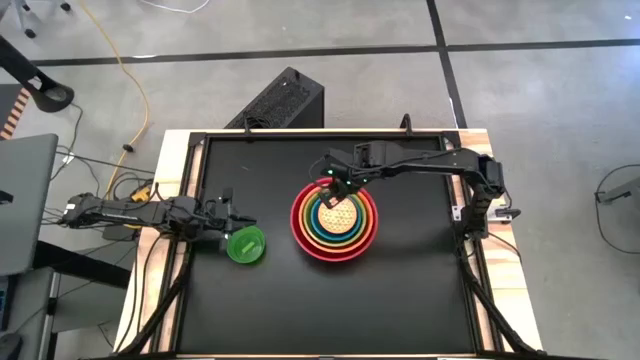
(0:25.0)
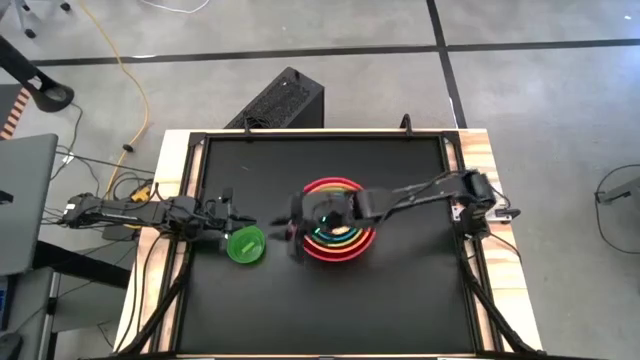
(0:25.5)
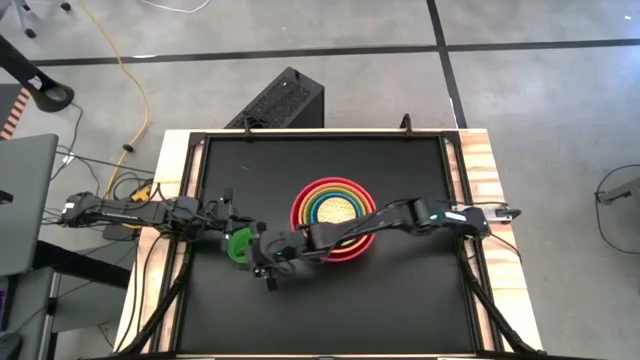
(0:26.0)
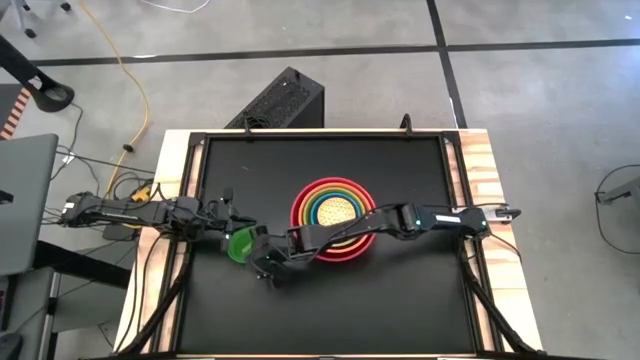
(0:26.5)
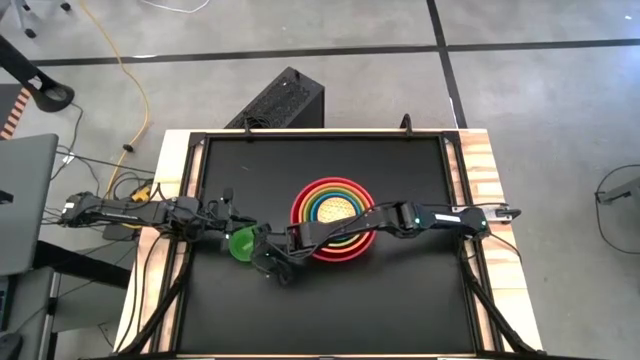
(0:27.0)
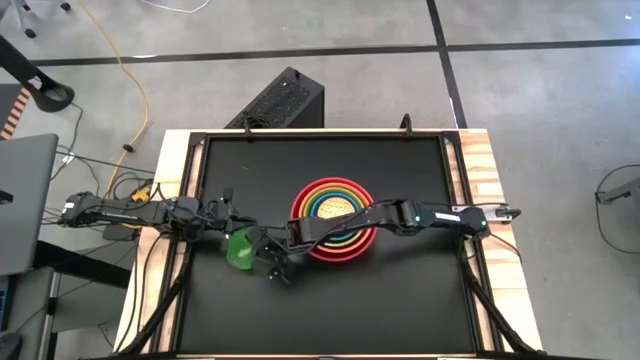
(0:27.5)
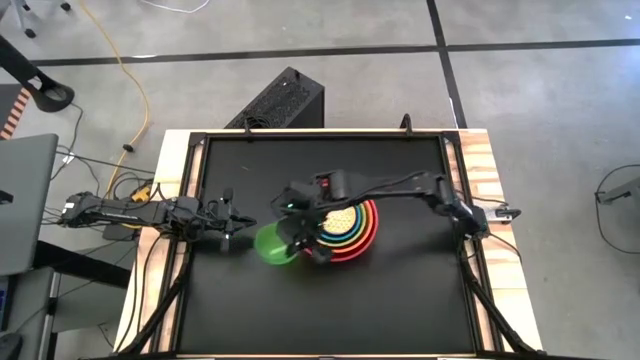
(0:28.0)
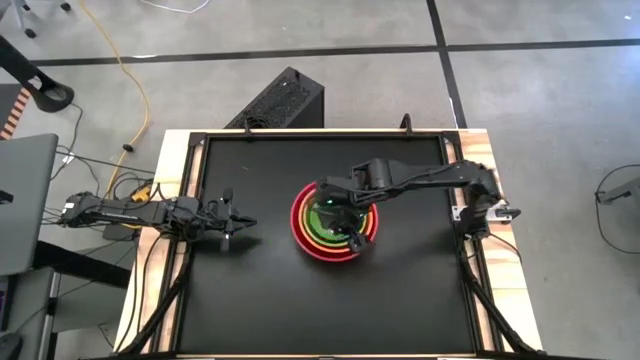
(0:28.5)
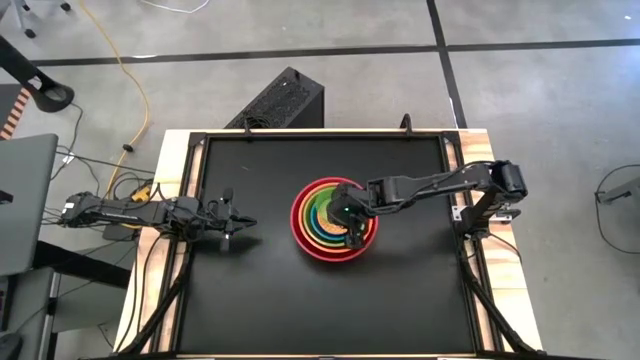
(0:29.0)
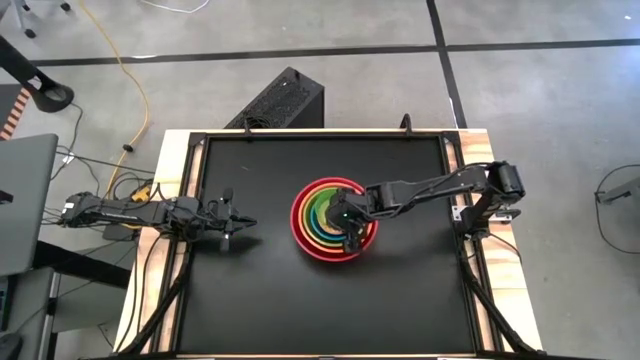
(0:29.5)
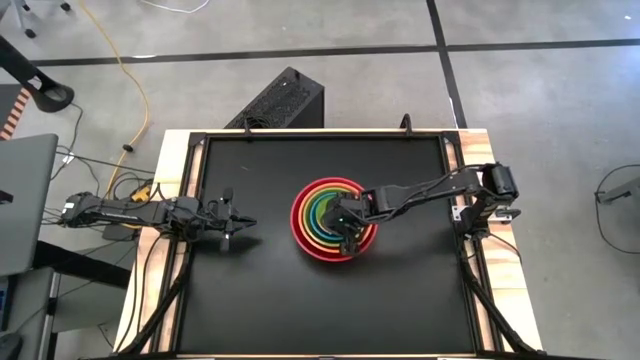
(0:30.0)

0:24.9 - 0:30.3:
Stack the light green bowl into the orange patterned bowl

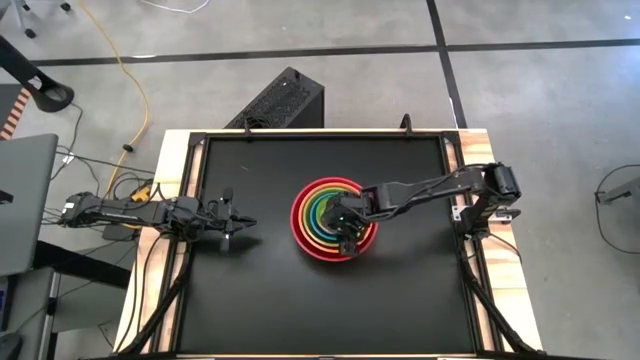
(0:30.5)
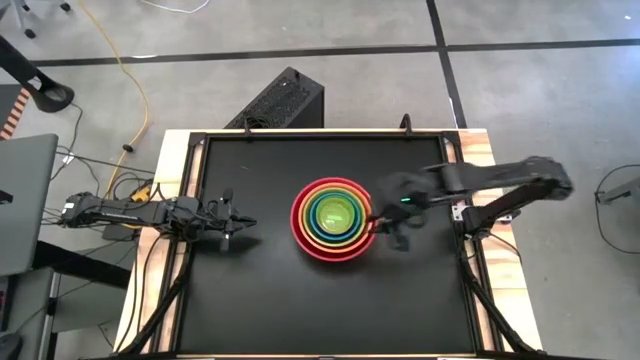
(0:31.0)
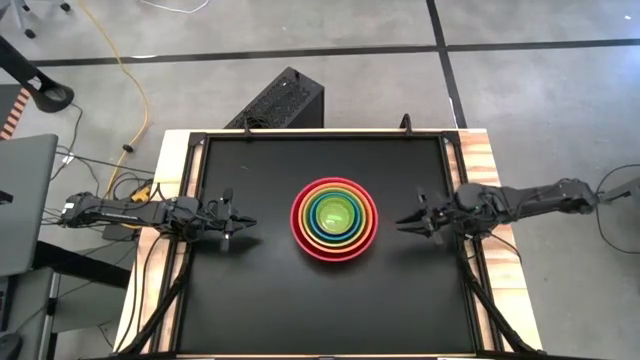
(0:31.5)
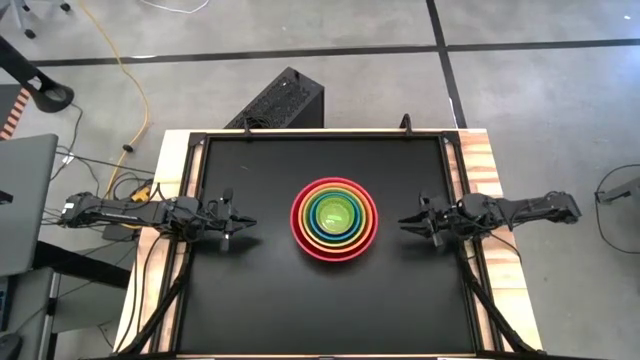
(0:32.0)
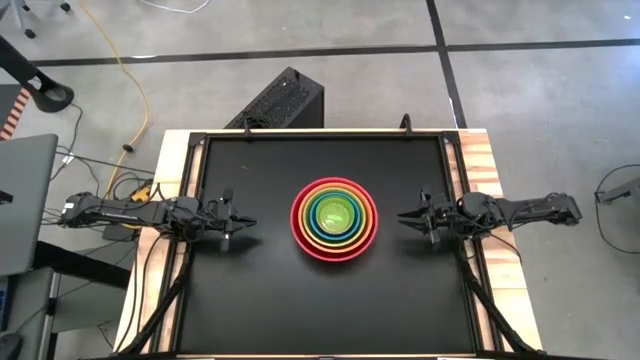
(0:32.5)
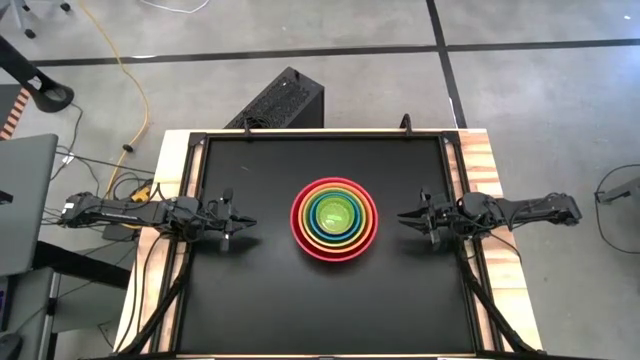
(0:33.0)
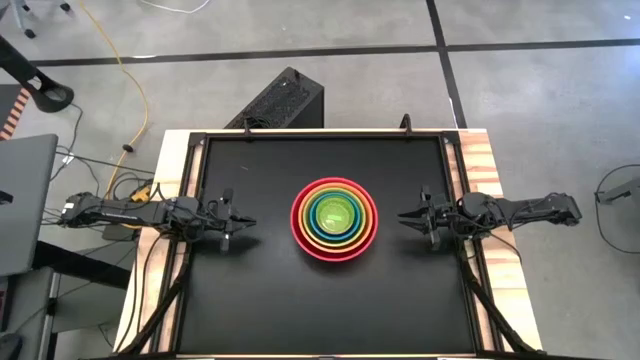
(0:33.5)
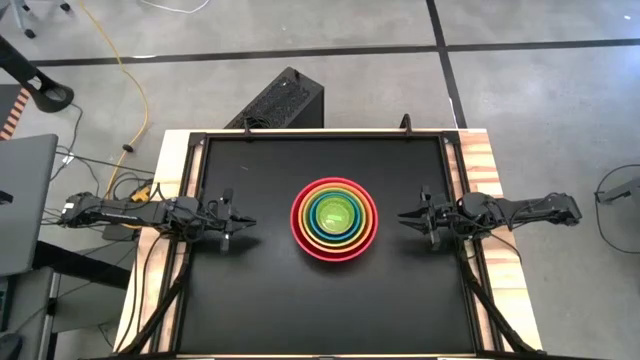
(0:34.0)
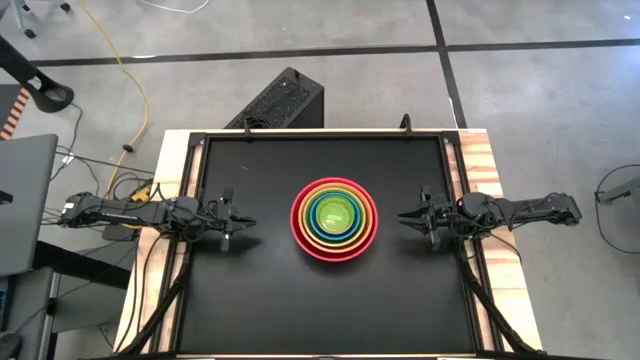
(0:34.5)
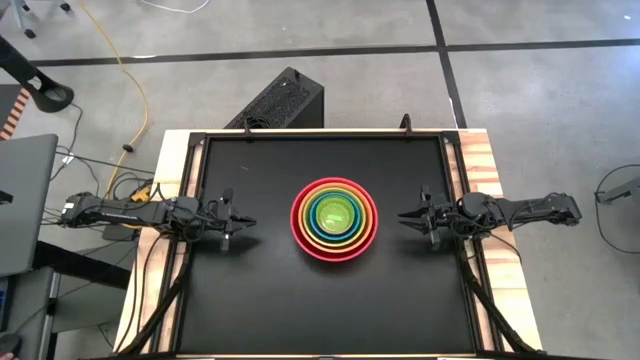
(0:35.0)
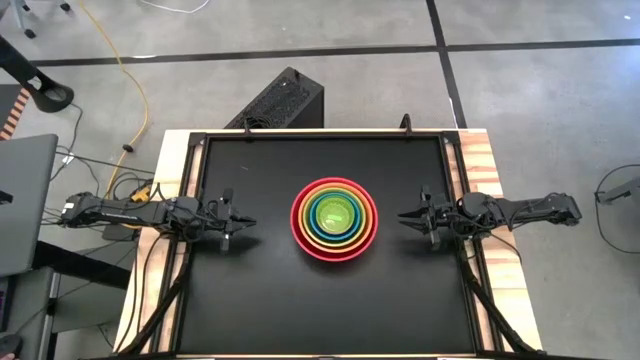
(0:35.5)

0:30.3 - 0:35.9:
Return to Home Position

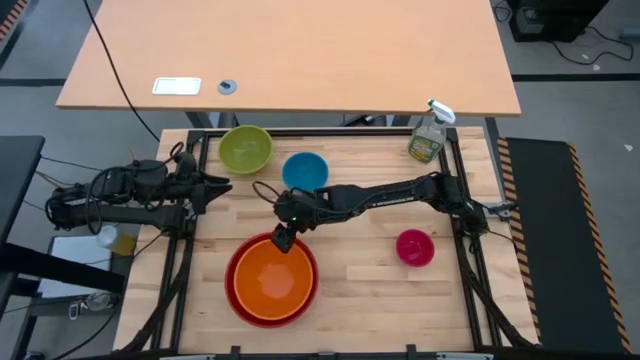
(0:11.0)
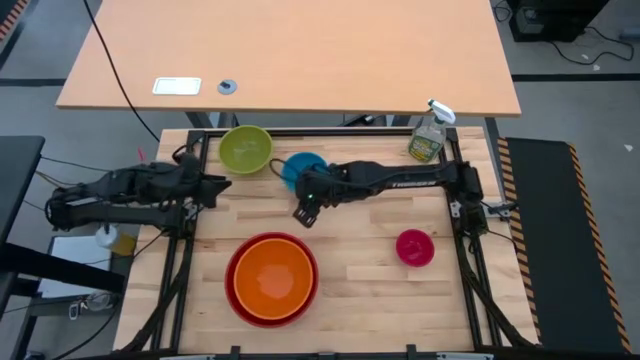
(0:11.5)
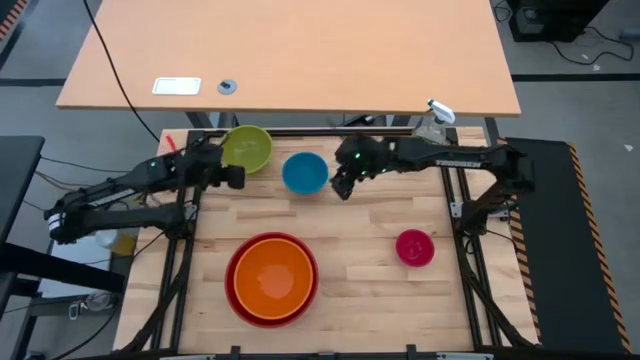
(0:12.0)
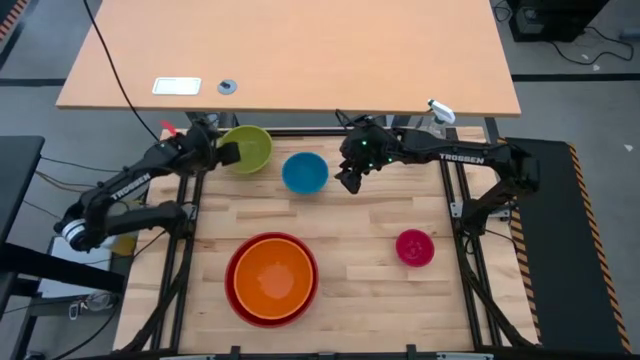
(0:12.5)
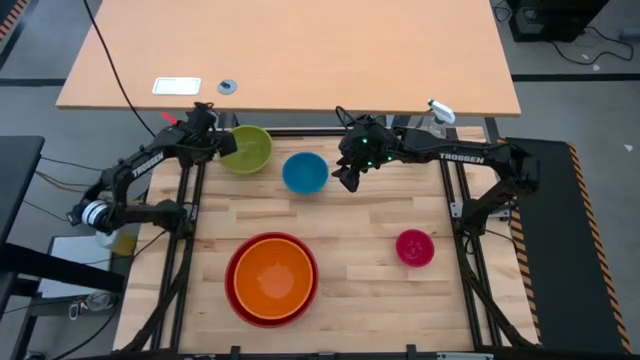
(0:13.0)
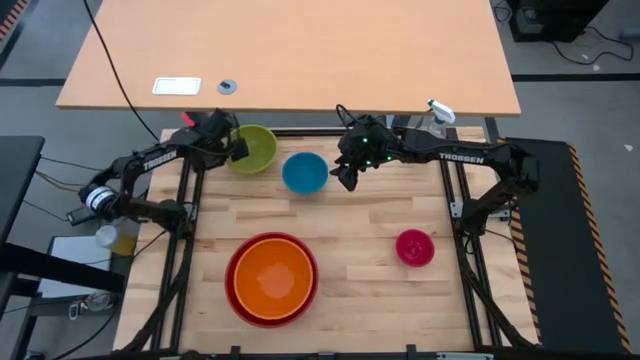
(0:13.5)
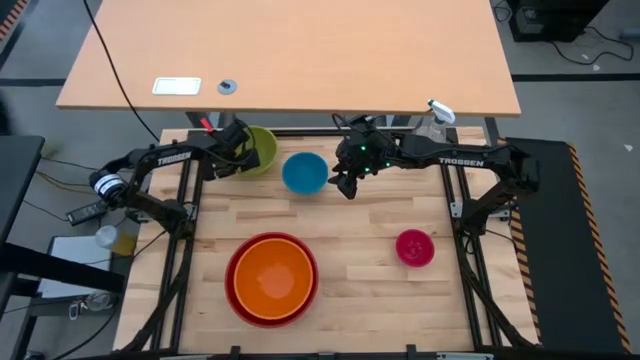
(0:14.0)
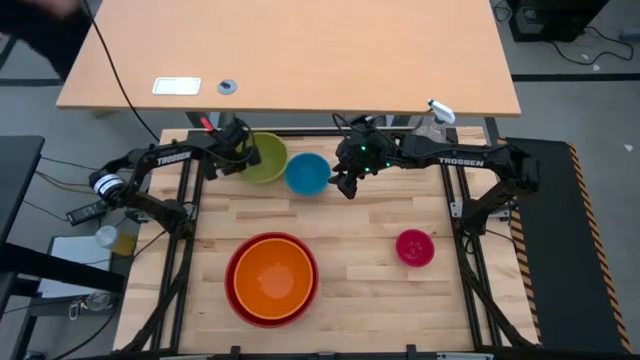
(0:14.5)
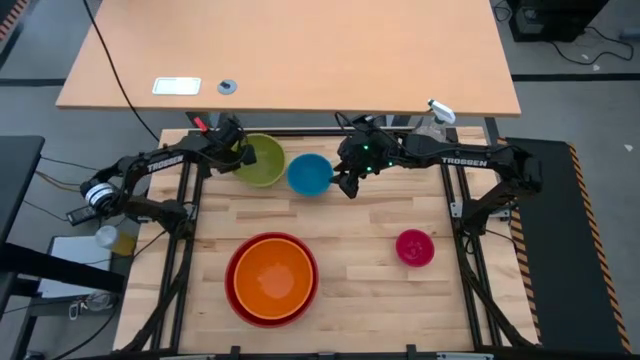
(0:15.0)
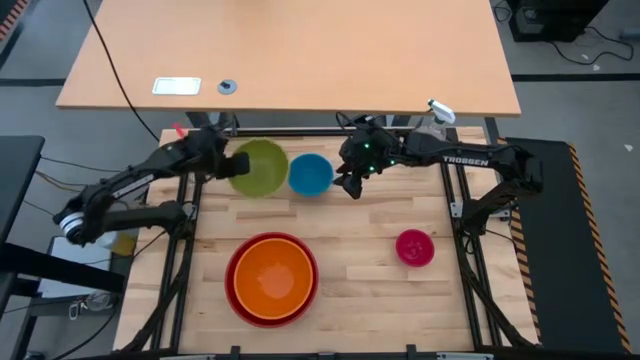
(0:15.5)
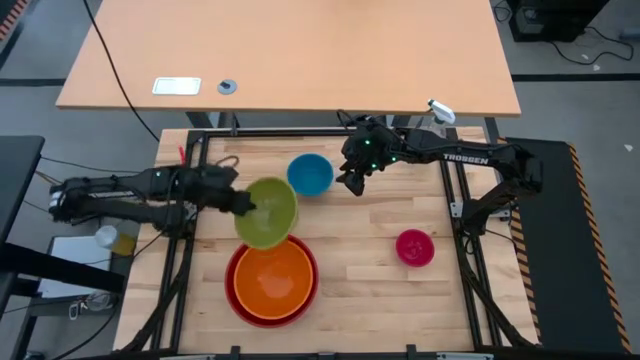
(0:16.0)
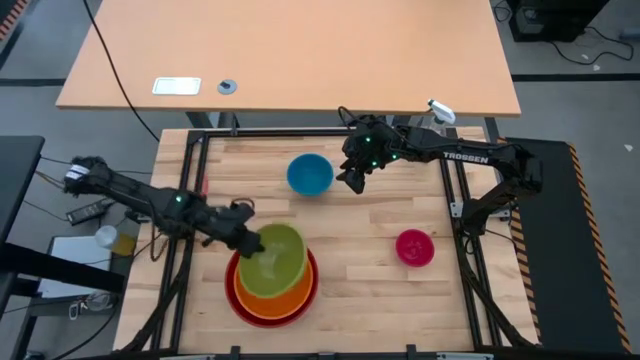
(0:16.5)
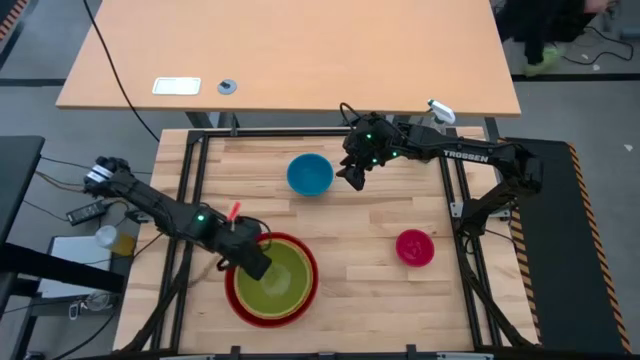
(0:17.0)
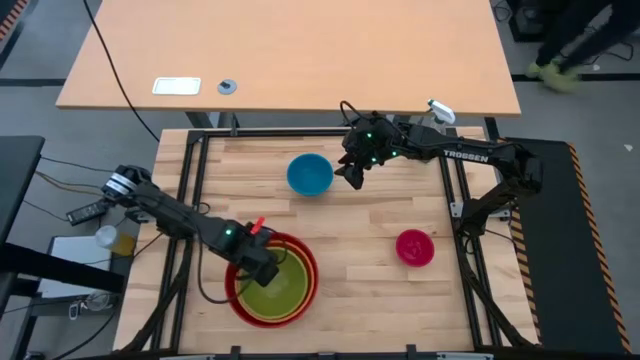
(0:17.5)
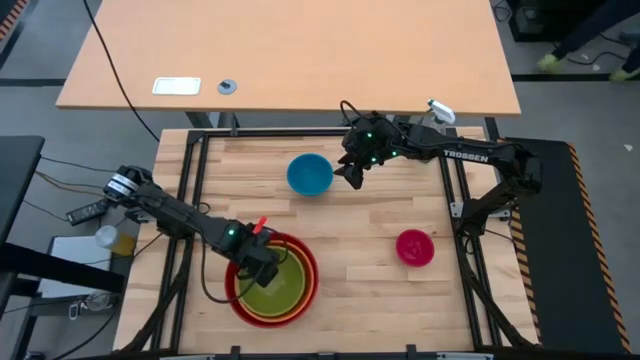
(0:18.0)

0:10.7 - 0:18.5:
Stack the green bowl on top of the orange bowl

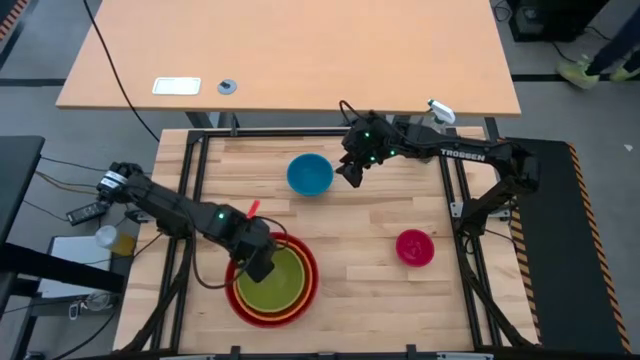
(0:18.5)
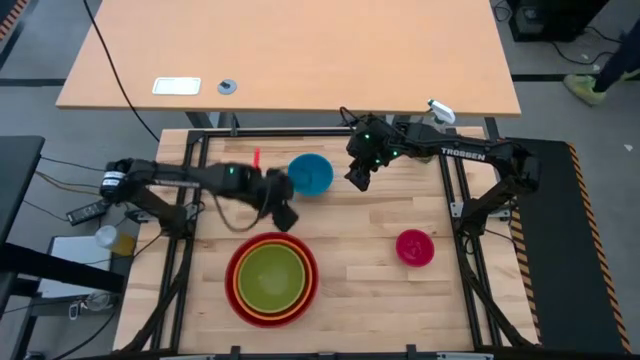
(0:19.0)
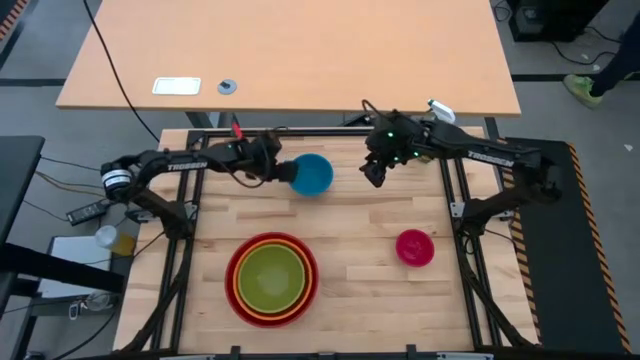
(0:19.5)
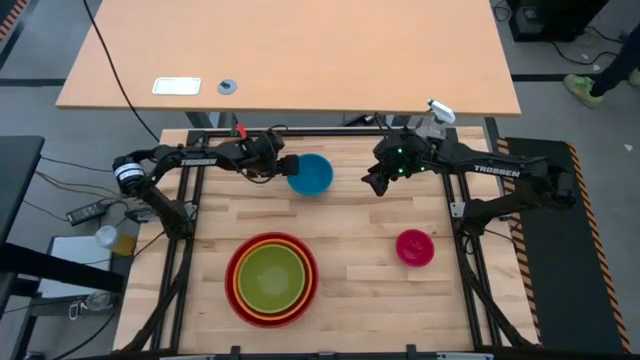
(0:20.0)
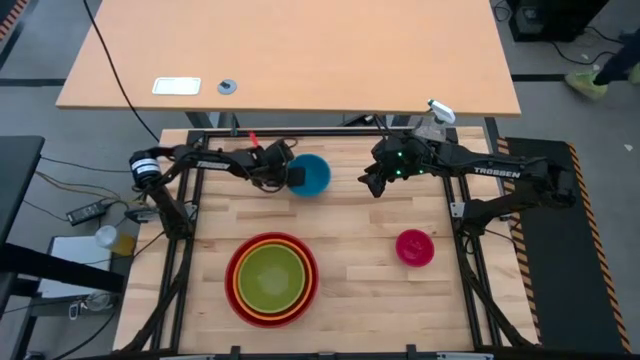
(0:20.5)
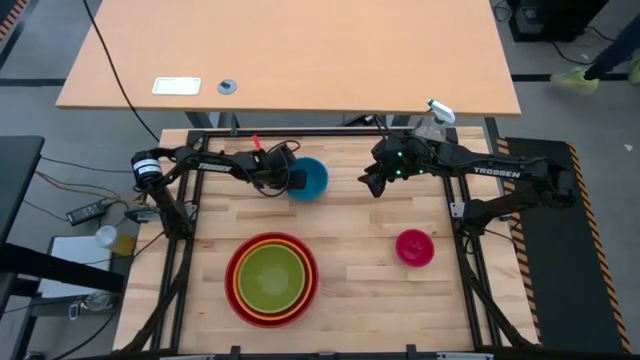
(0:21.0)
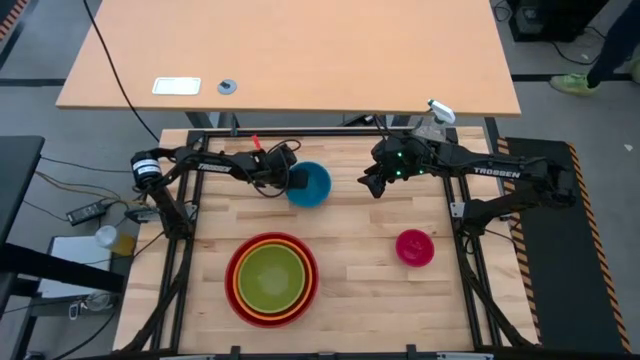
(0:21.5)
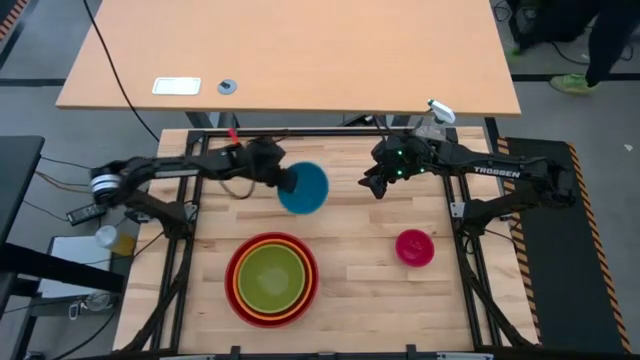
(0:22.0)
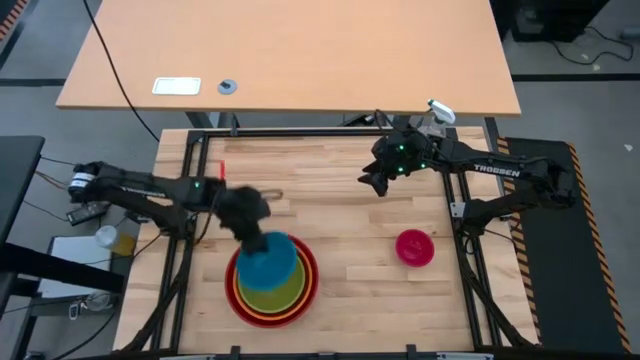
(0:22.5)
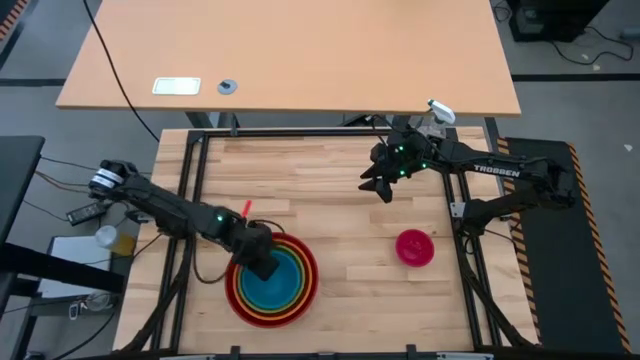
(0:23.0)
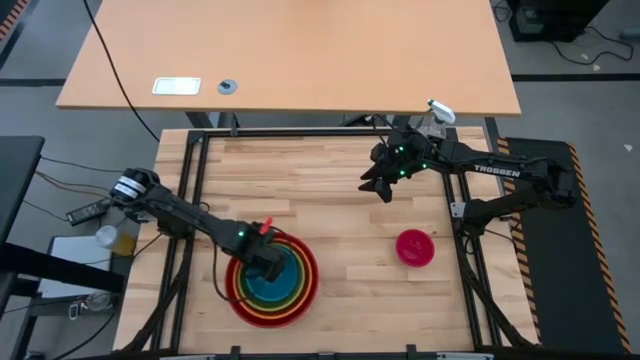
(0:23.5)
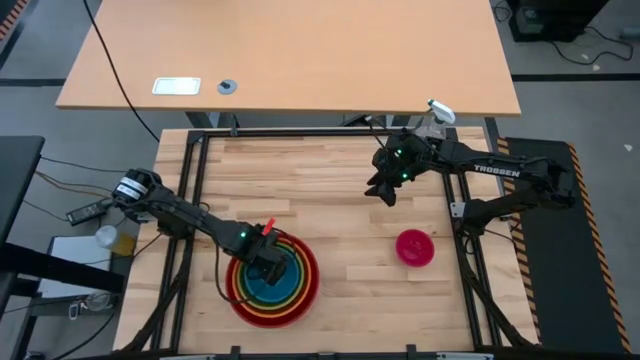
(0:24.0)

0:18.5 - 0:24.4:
Stack the blue bowl on top of the green bowl
